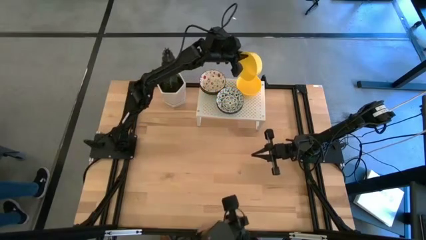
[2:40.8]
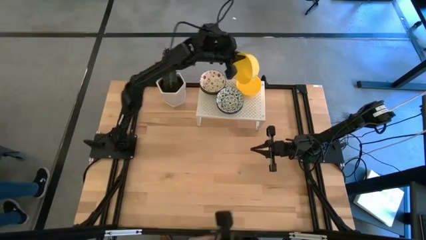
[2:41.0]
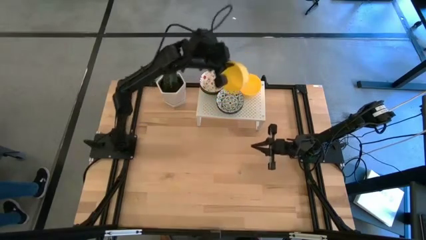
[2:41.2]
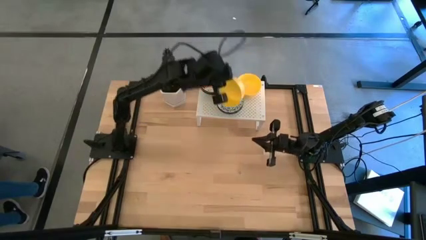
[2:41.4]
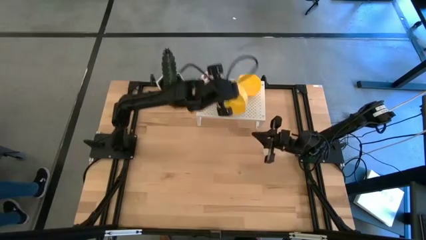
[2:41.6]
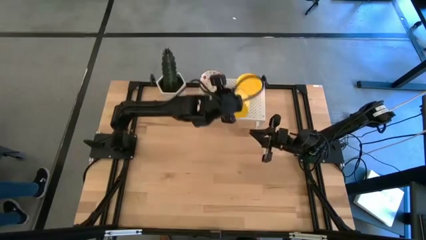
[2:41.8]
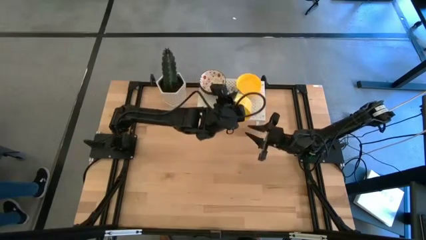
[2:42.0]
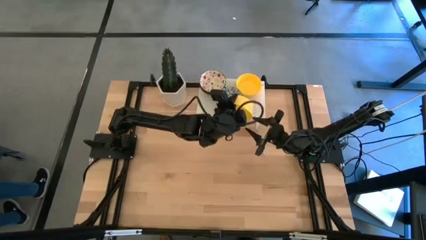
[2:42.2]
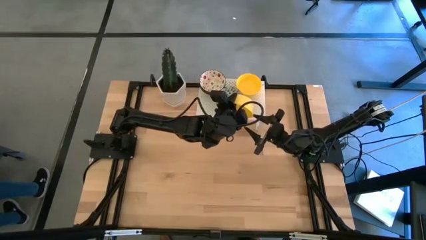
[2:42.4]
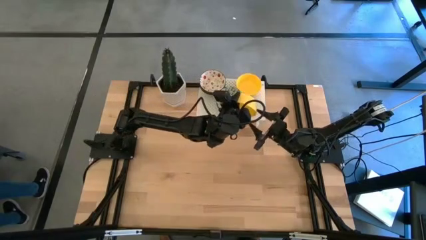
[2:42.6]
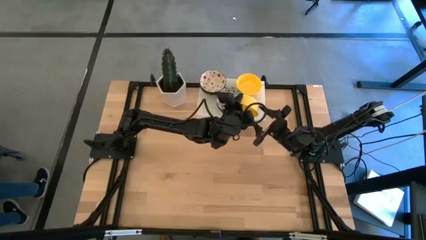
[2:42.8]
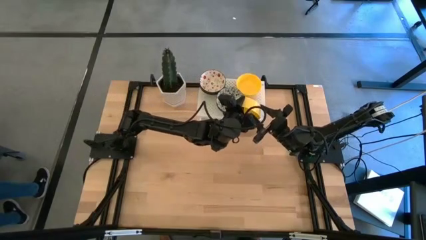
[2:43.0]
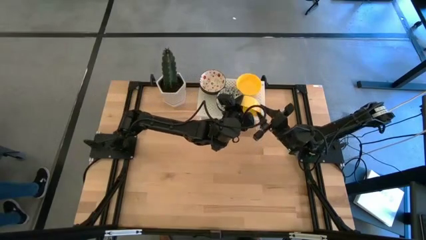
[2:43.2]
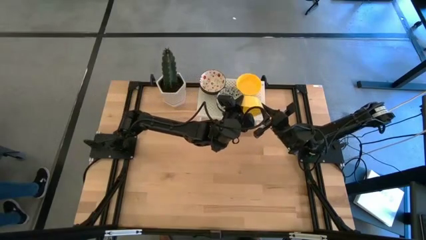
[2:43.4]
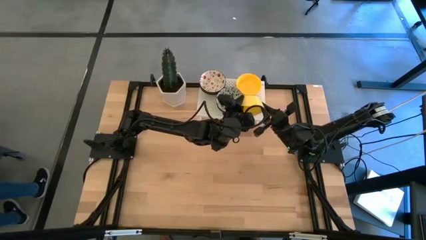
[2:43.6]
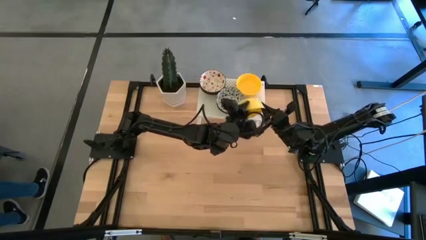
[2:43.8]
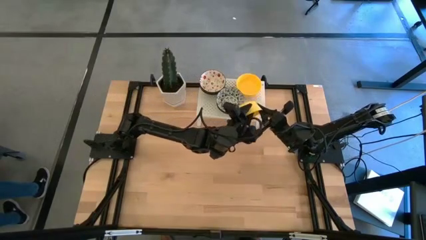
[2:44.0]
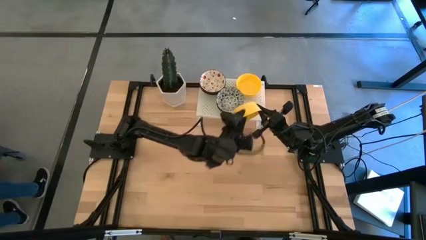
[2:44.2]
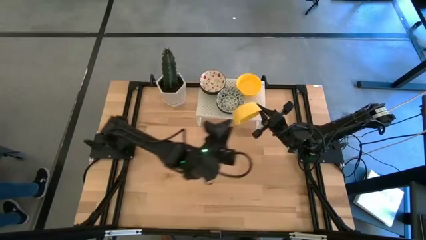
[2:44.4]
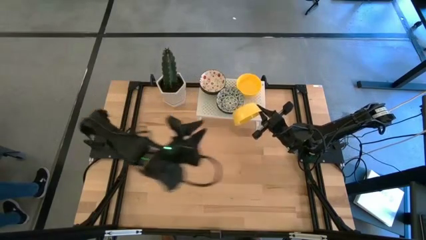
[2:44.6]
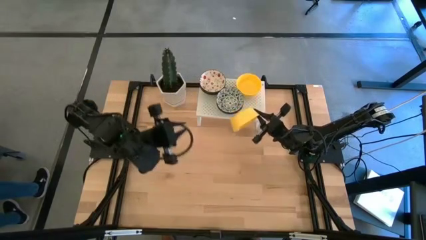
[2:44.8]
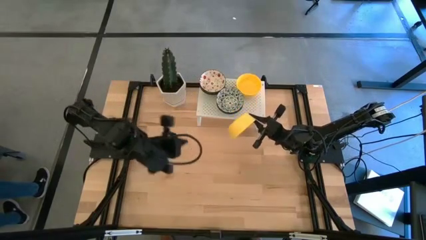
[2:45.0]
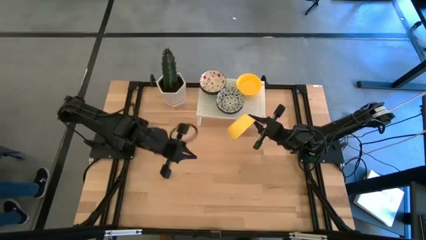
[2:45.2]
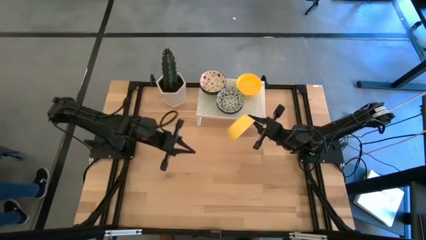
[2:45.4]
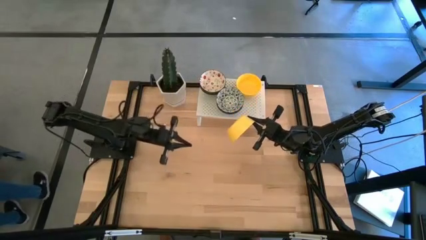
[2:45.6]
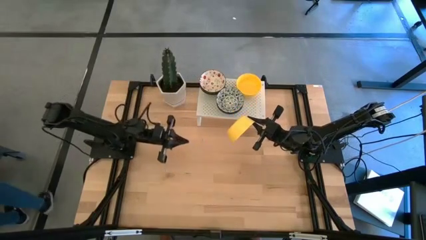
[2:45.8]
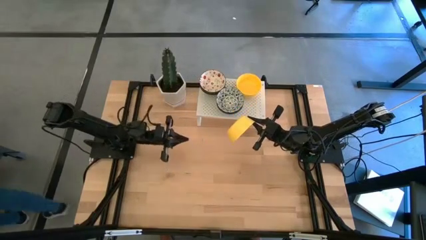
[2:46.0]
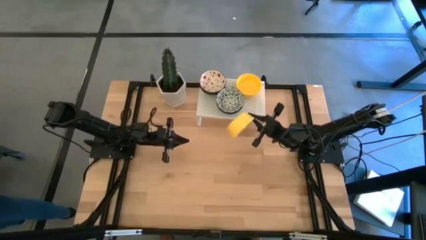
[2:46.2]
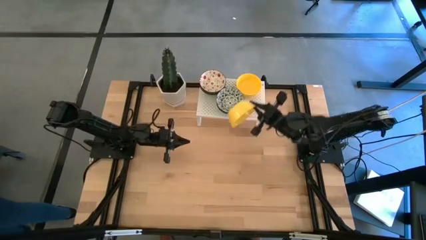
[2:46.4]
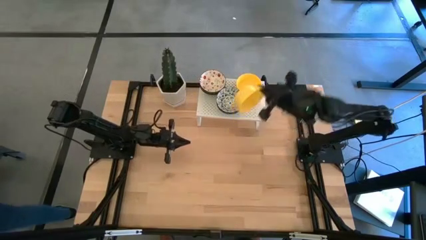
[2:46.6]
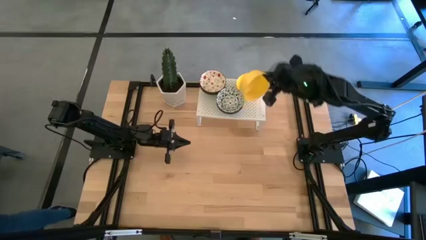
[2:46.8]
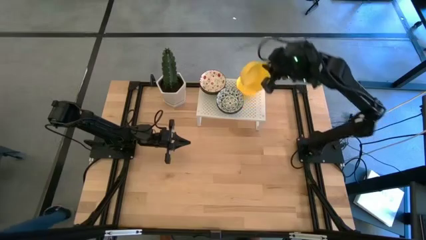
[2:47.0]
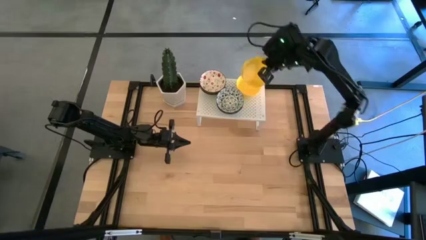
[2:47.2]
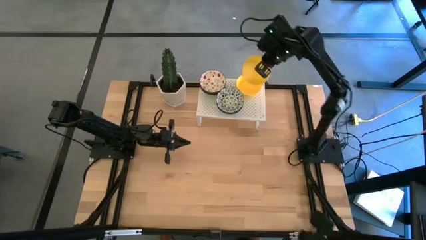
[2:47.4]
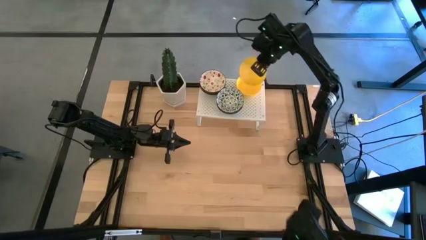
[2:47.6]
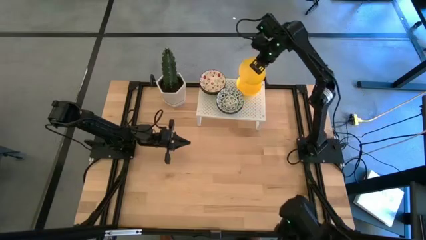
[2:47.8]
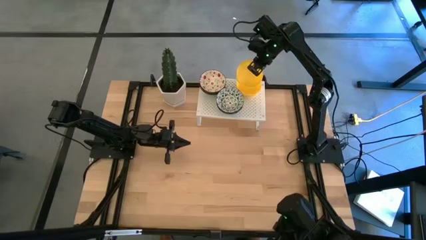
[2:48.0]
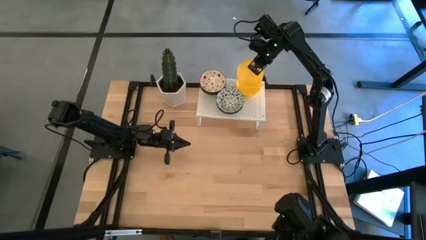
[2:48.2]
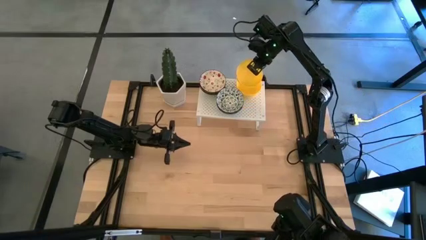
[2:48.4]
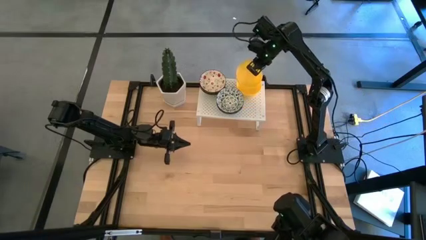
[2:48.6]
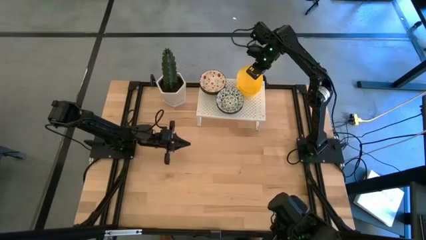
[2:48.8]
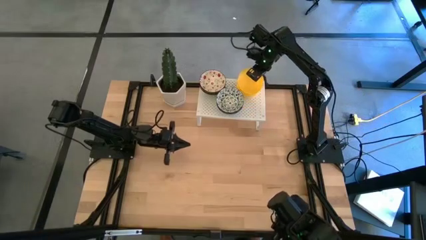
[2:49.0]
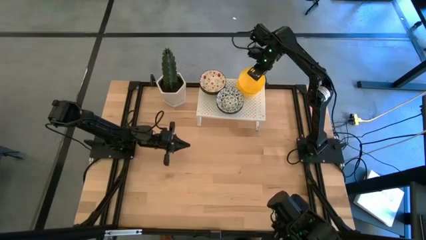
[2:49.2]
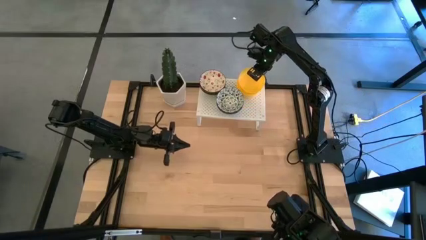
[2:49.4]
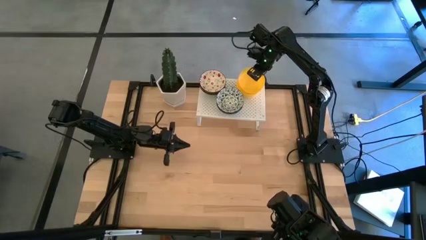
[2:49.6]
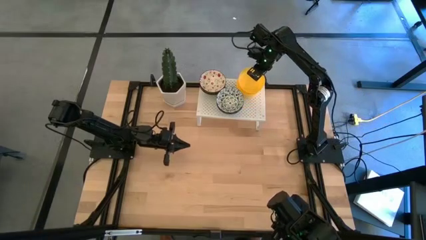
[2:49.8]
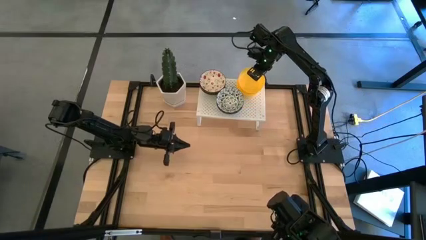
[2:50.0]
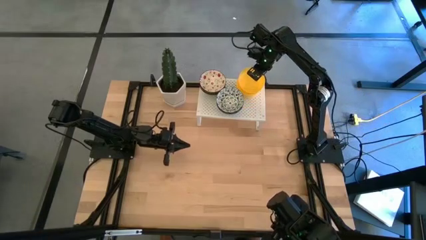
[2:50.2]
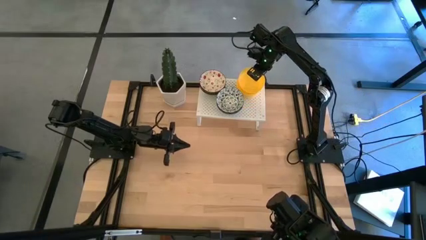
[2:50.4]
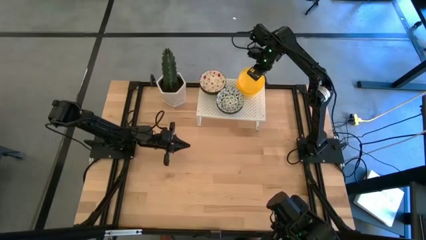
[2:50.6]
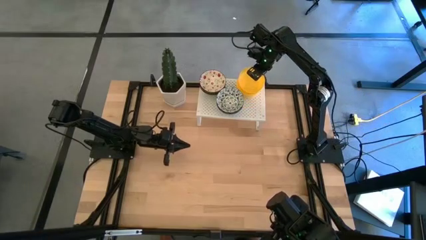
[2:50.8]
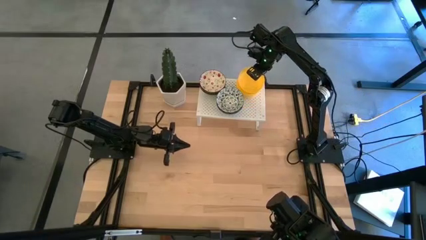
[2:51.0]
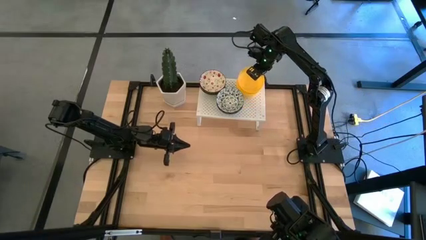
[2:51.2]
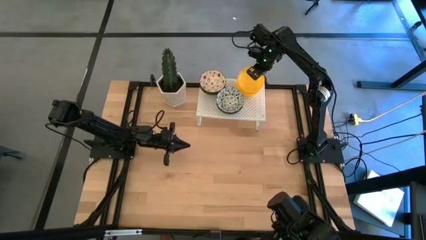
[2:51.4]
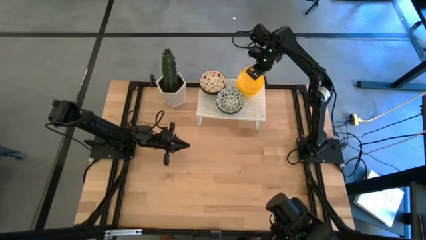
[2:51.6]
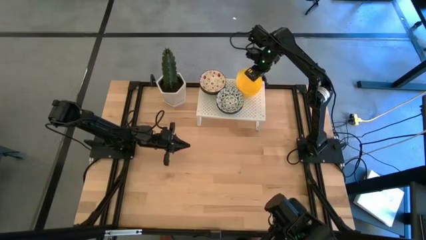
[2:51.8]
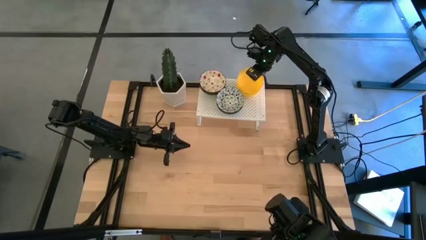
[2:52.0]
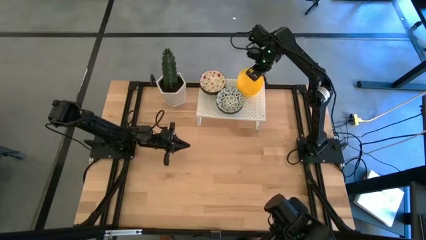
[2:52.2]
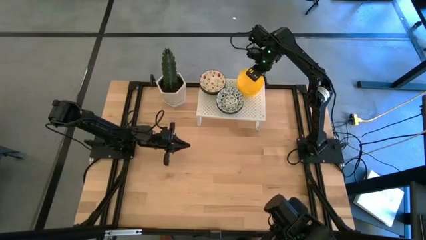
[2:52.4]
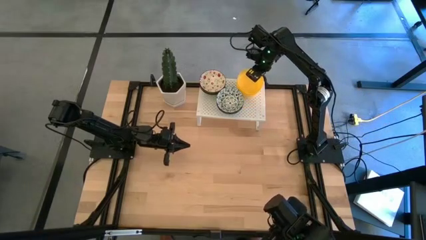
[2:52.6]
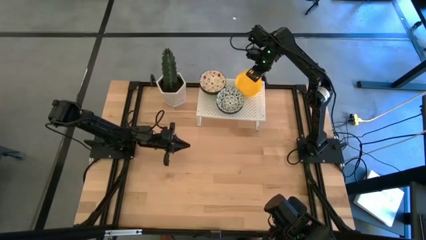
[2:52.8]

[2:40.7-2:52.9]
Task: Pick & Place Mini bowls
Stack the yellow bowl on the yellow bowls on the shelf
